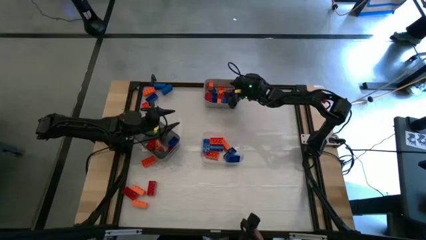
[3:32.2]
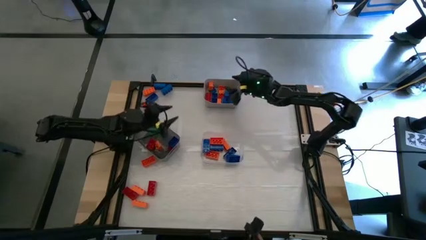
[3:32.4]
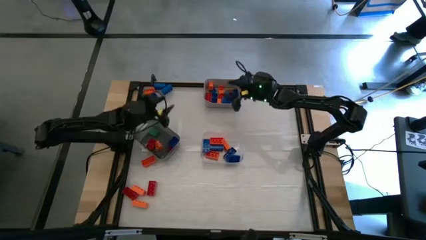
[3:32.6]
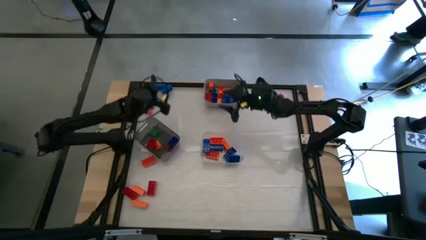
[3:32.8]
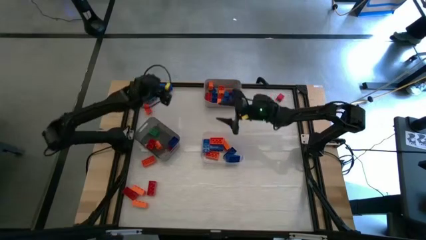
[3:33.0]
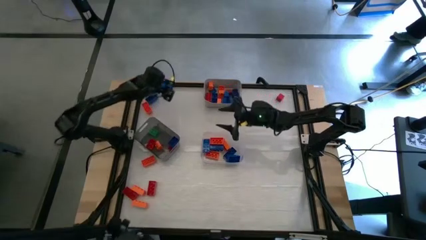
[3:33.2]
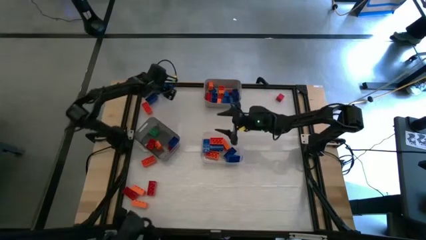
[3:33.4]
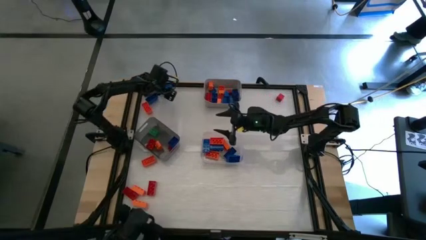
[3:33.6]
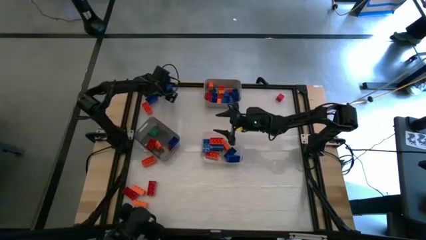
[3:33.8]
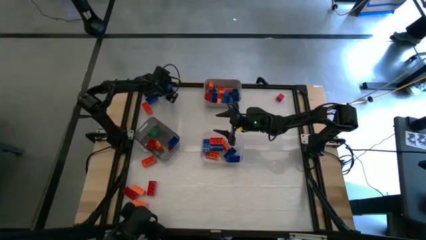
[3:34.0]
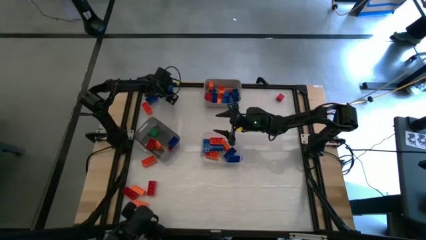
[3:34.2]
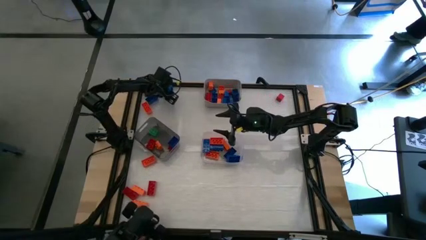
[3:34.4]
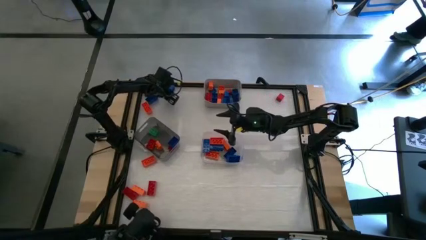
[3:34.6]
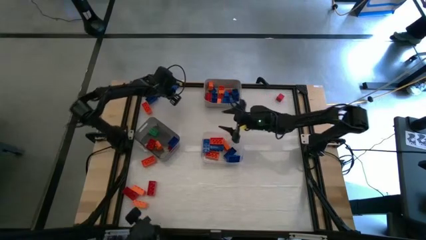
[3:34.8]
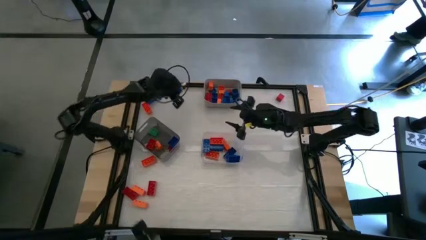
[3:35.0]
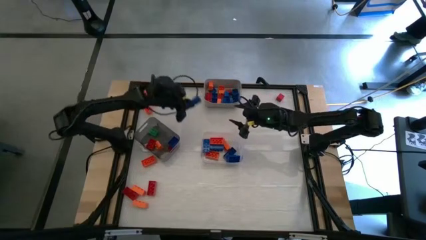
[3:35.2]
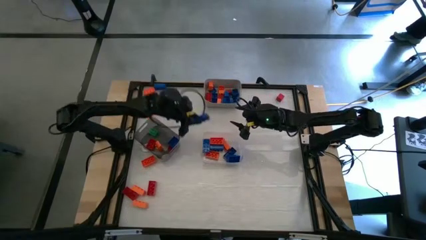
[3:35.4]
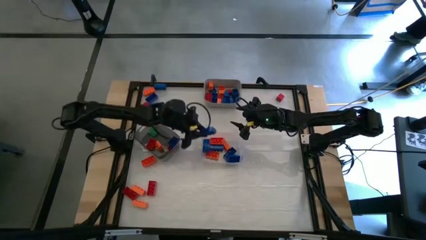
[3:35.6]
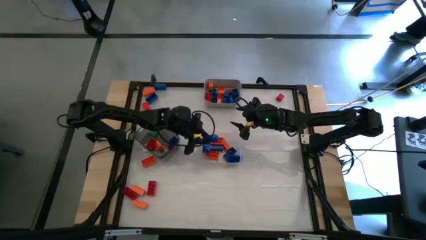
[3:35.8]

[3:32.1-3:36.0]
Task: Sort blocks by size
Put the big blue game piece into the transparent bin

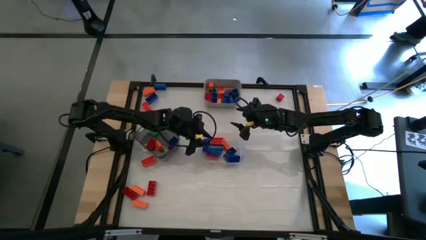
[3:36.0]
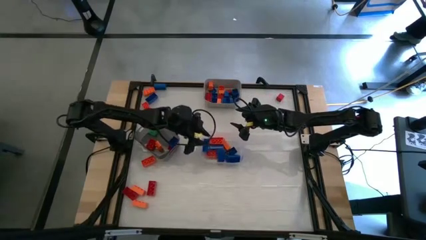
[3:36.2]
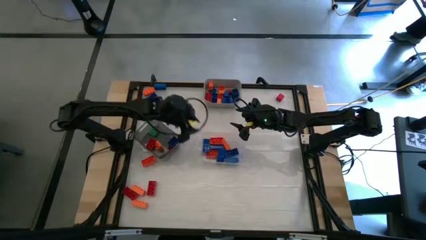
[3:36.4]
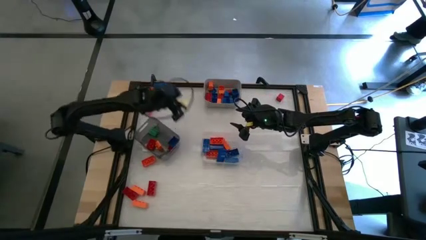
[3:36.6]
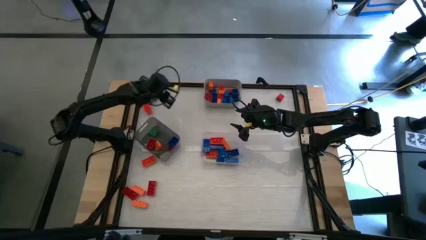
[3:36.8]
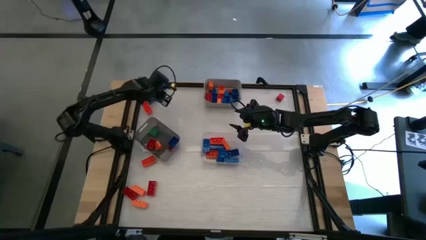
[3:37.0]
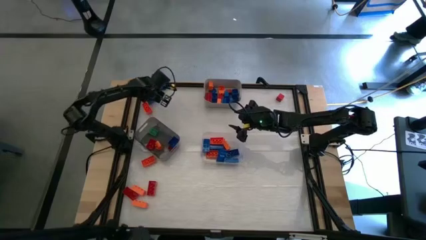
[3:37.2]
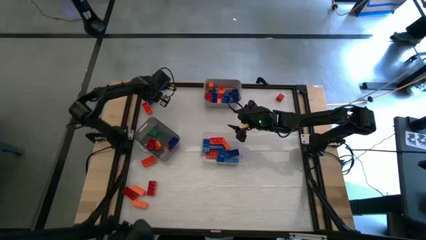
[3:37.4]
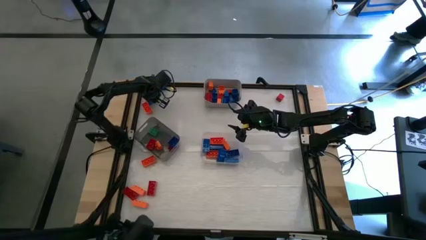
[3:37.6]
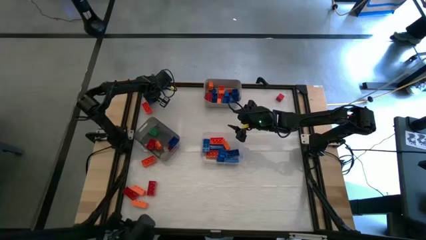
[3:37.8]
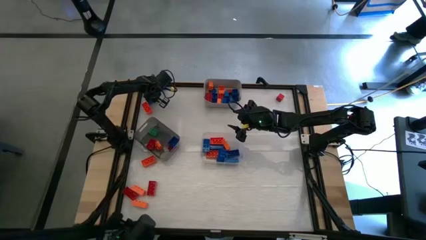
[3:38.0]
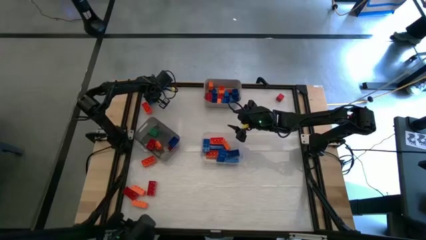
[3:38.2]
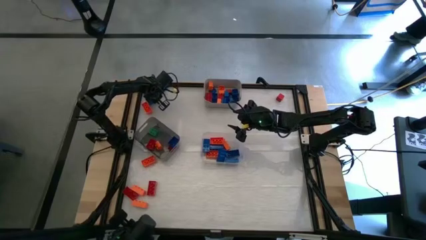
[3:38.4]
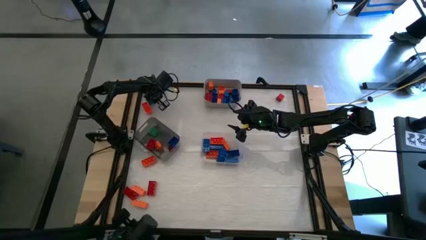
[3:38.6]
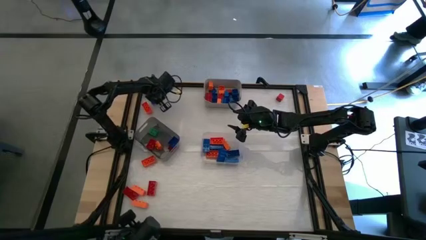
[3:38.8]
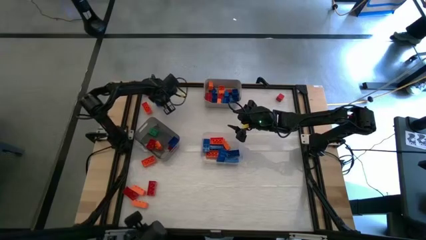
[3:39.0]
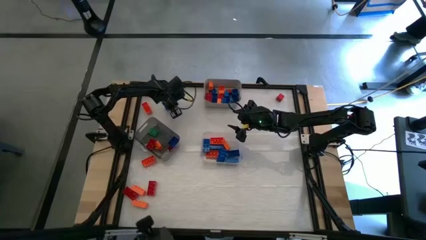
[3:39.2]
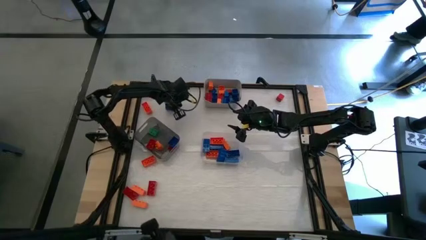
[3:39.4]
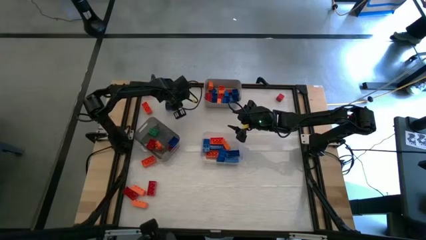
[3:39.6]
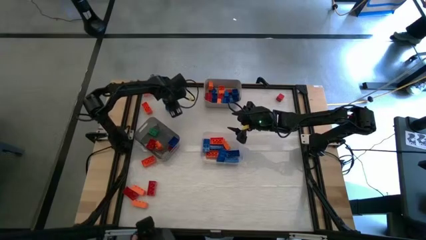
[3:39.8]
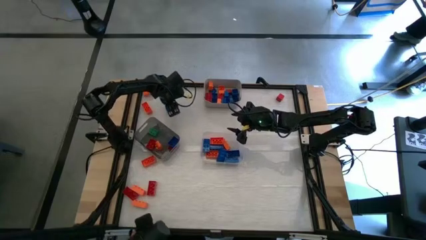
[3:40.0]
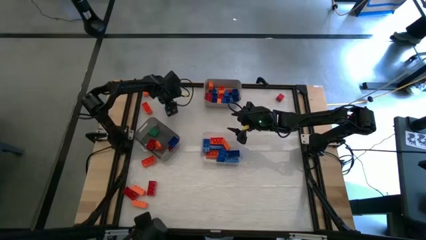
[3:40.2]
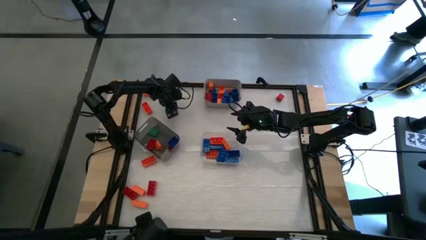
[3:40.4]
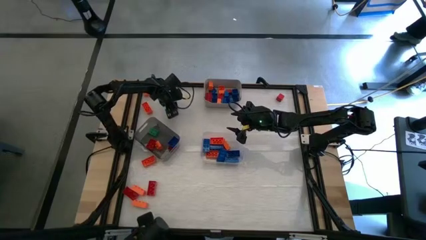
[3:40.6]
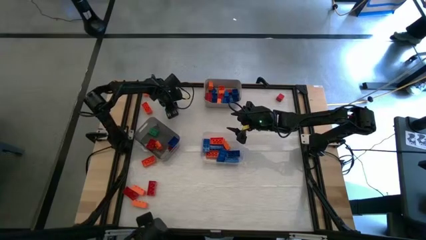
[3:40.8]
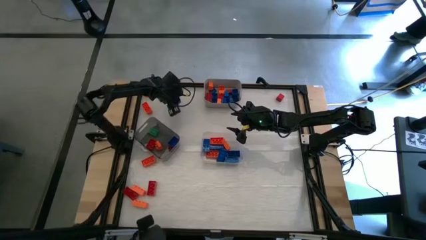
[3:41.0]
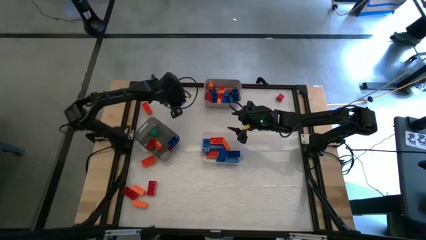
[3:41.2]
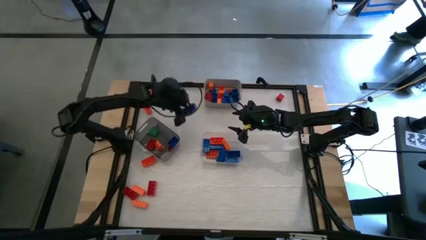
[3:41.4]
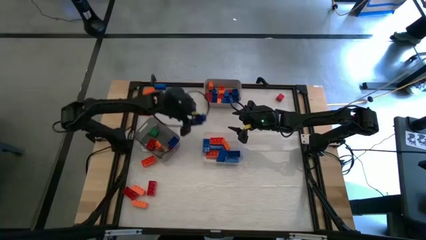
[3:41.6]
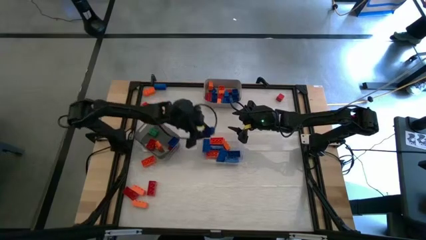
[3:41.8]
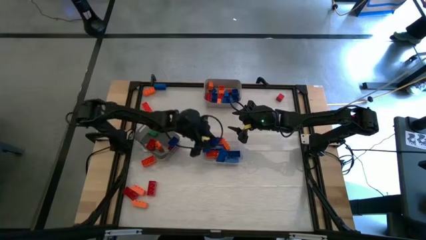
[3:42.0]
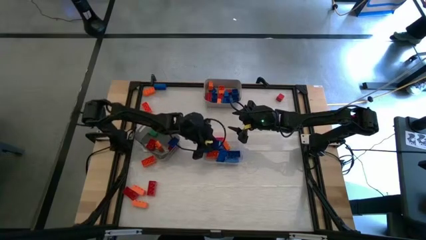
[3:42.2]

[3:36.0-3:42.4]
Put the big blue game piece into the transparent bin

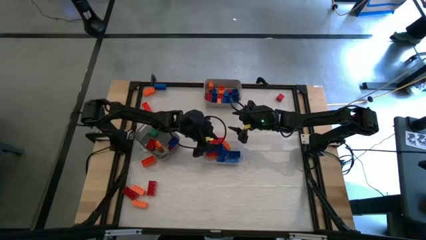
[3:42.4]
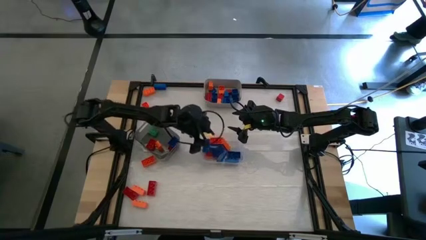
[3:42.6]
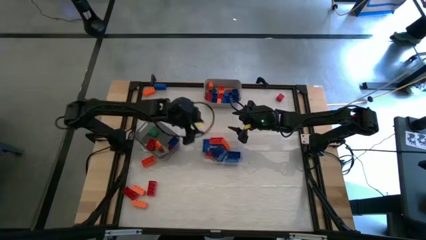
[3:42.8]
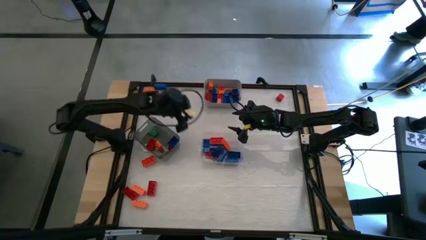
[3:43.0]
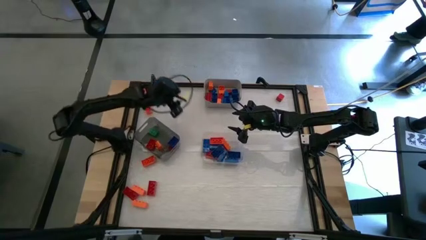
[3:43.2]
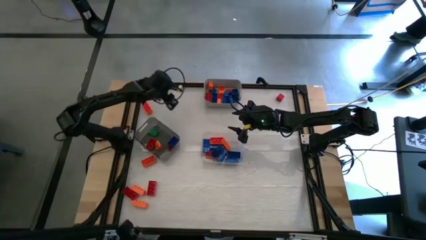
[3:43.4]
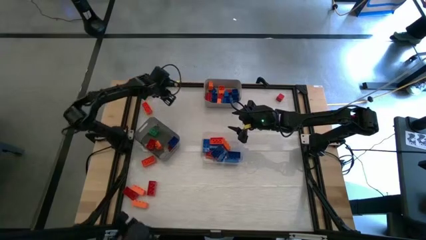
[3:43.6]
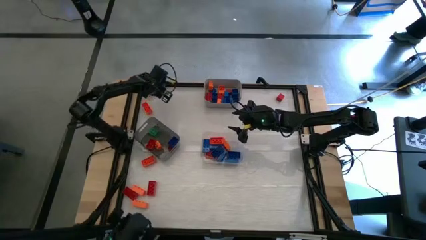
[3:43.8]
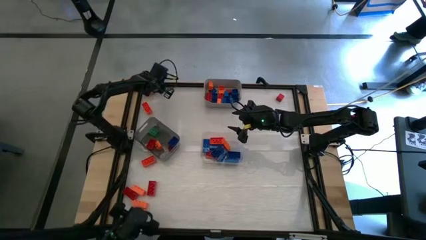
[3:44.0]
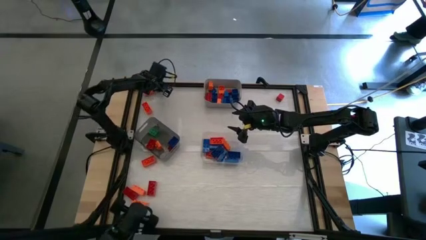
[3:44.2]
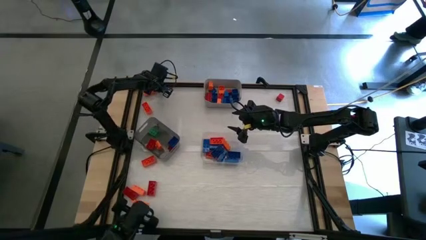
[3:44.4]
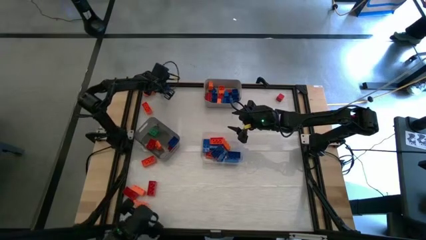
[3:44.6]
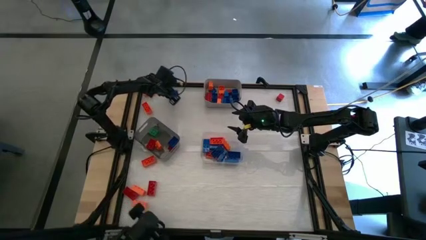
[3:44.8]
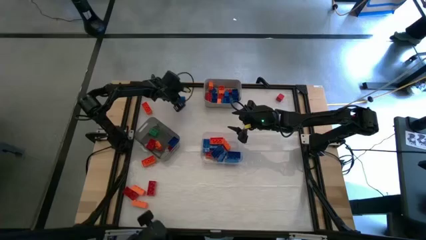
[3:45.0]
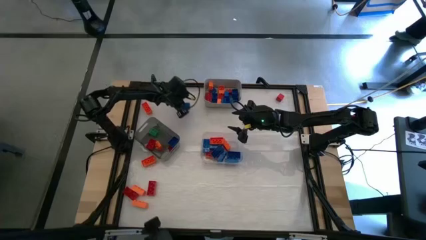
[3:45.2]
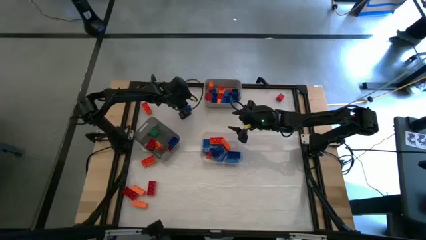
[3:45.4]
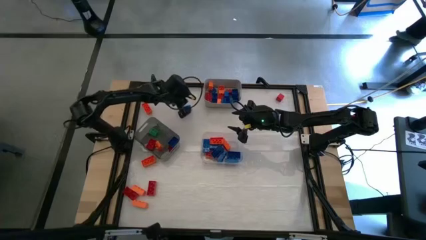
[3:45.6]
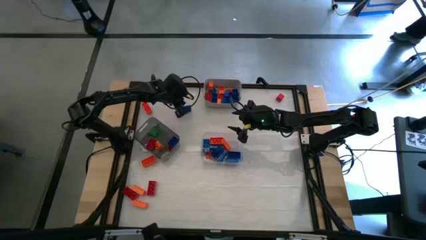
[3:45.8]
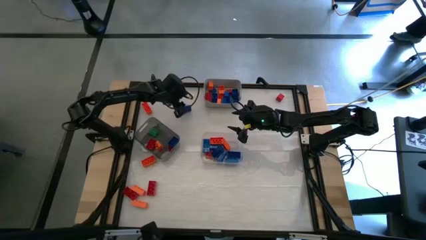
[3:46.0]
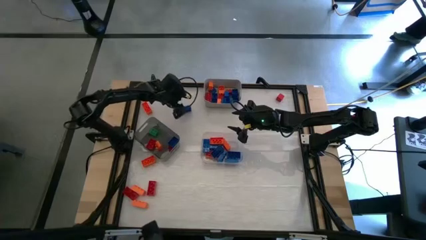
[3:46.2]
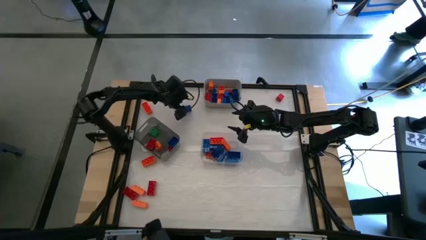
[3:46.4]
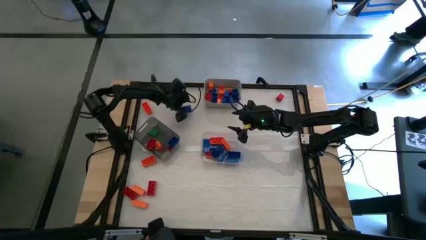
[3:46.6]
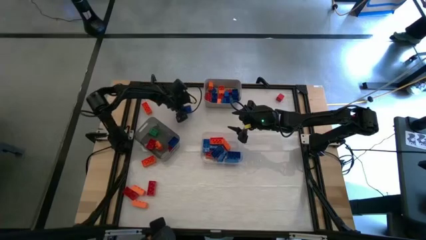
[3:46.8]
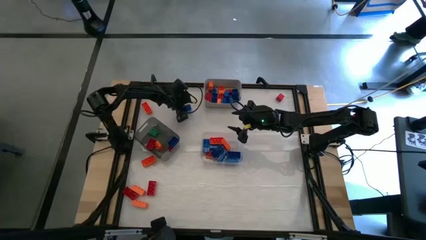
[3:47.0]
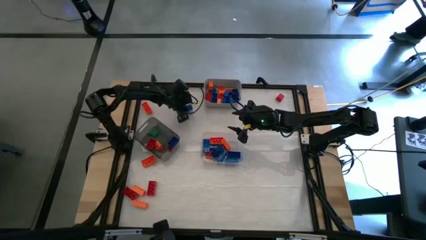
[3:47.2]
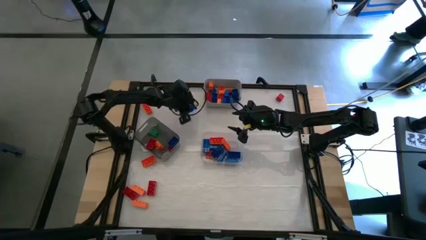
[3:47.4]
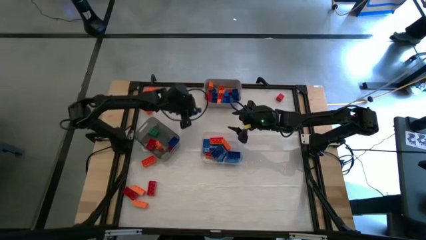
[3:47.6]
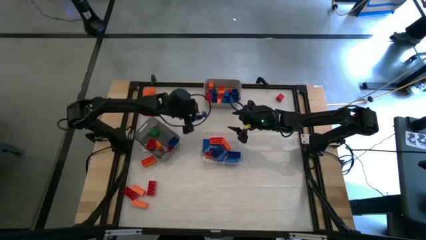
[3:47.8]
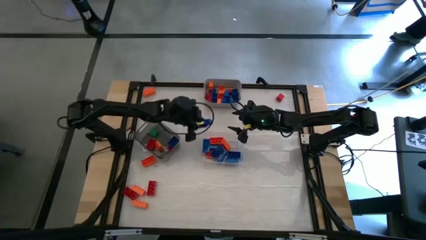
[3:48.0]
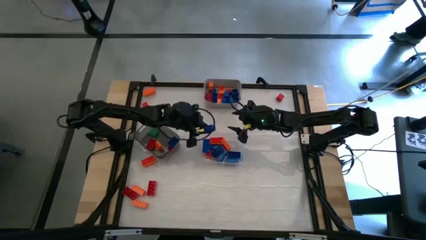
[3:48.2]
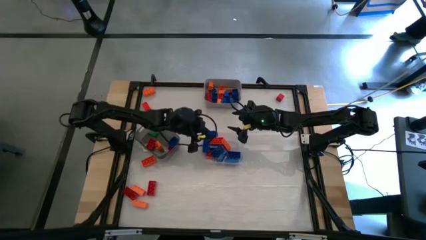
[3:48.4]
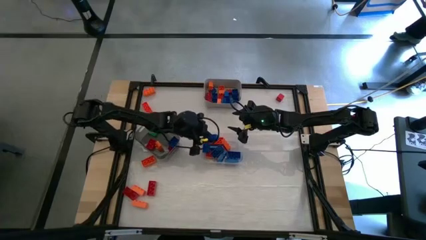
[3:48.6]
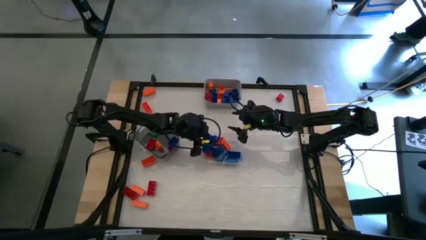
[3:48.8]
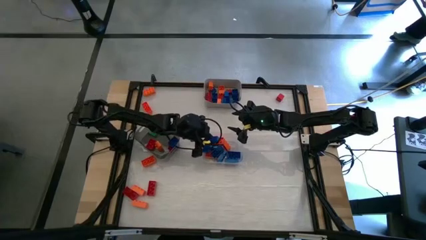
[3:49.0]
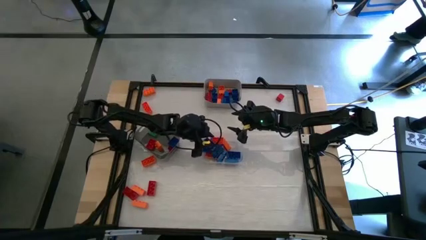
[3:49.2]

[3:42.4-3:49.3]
Put the big blue game piece into the transparent bin
